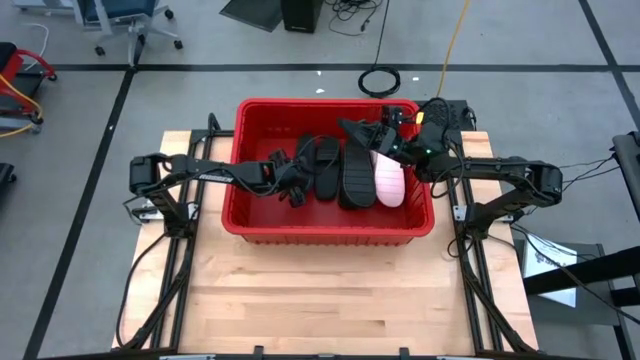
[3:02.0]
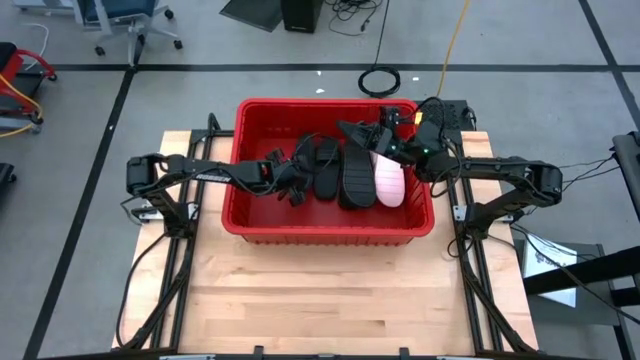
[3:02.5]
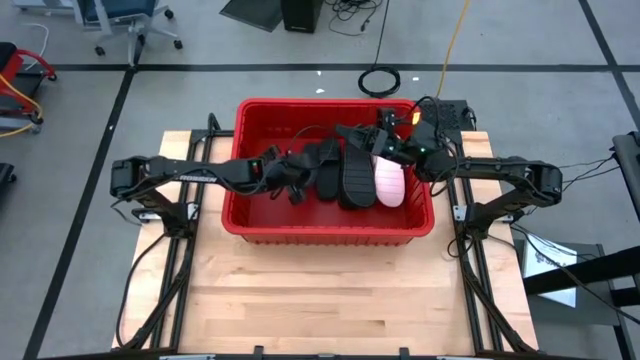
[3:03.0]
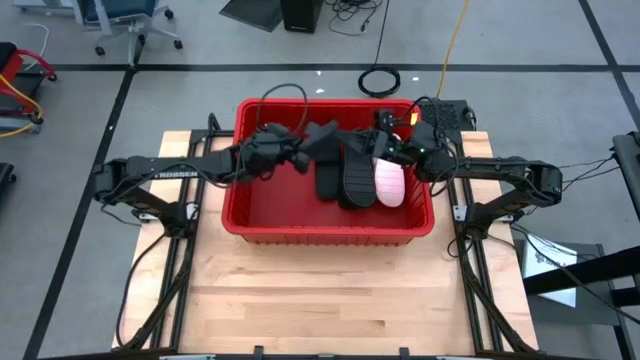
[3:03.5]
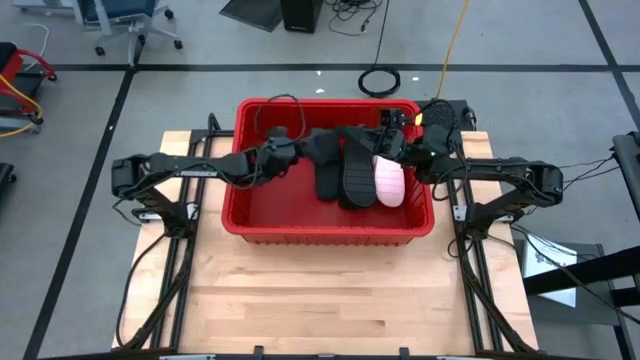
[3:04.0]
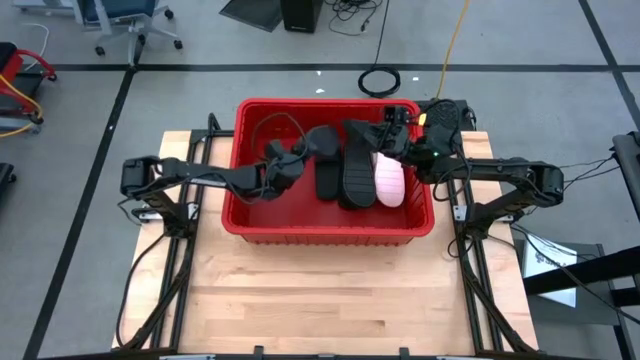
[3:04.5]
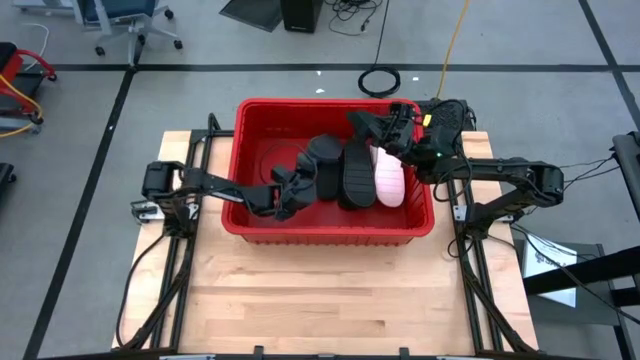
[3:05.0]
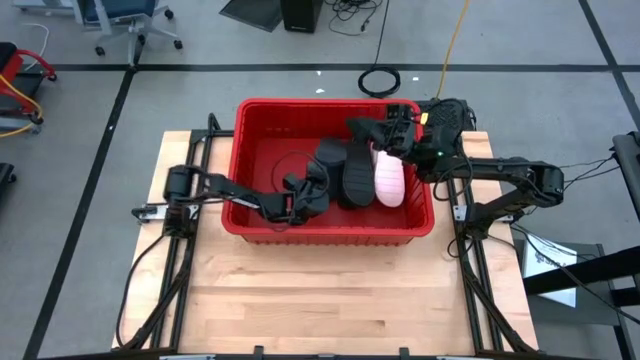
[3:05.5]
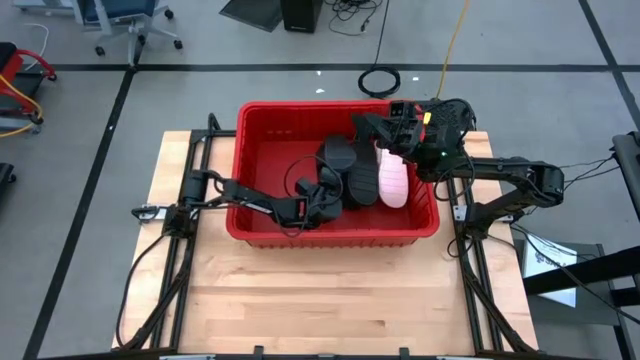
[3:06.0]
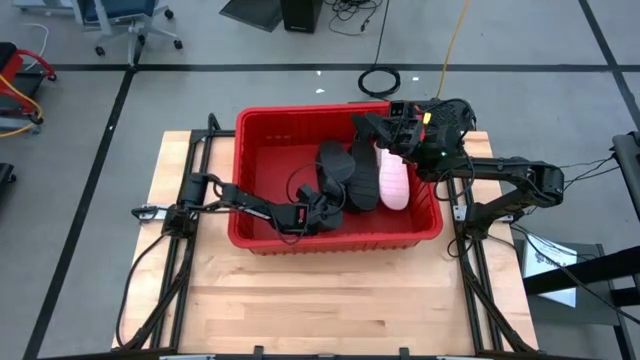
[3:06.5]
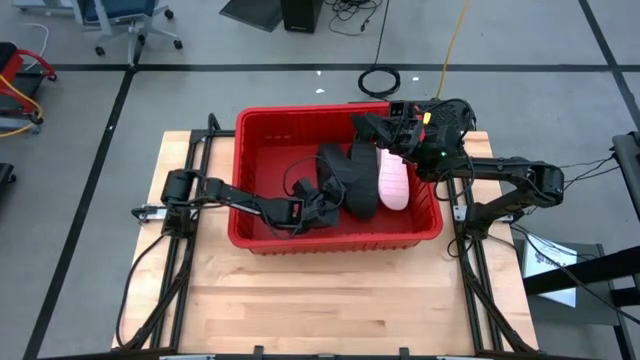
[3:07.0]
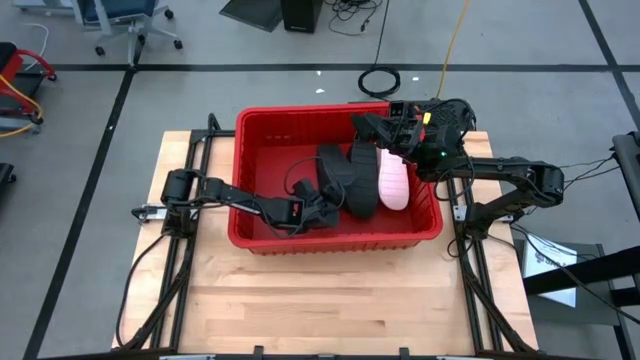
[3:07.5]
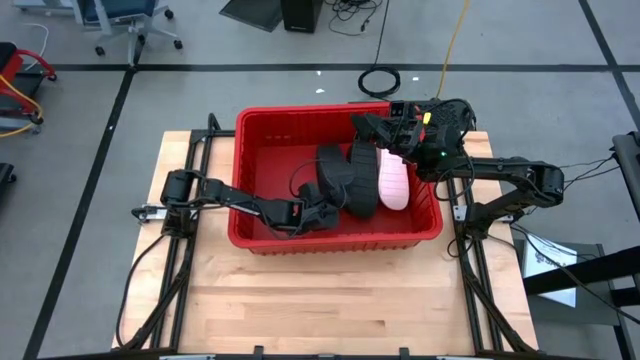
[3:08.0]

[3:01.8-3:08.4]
Task: Pick and place slides into bin
Stack the black slide on top of the black slide in the red bin

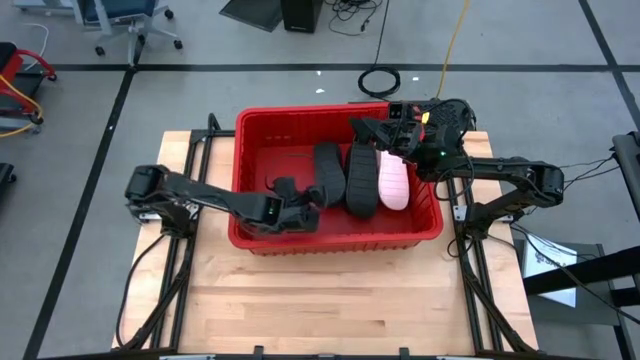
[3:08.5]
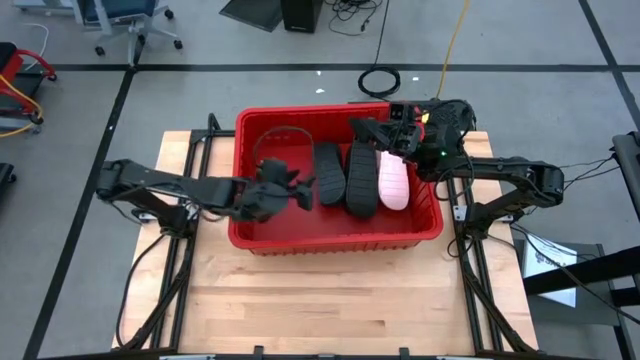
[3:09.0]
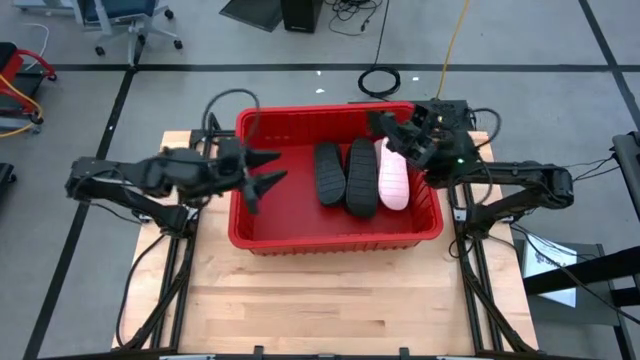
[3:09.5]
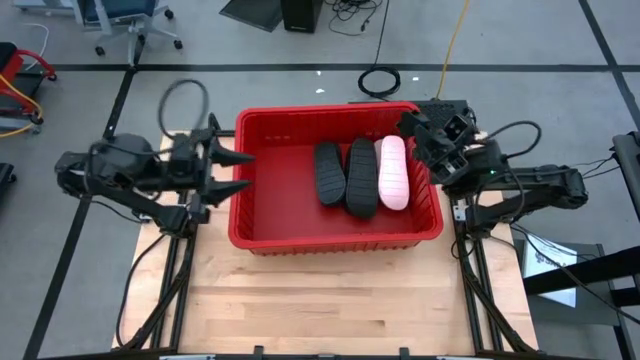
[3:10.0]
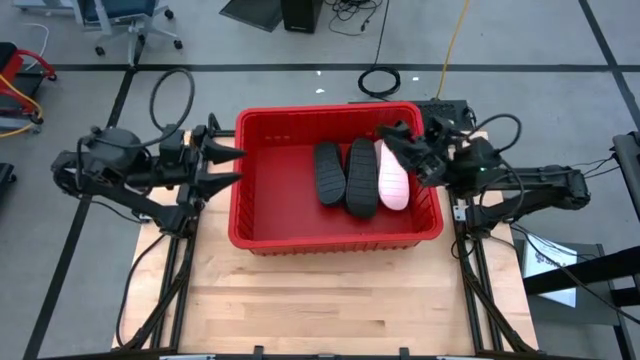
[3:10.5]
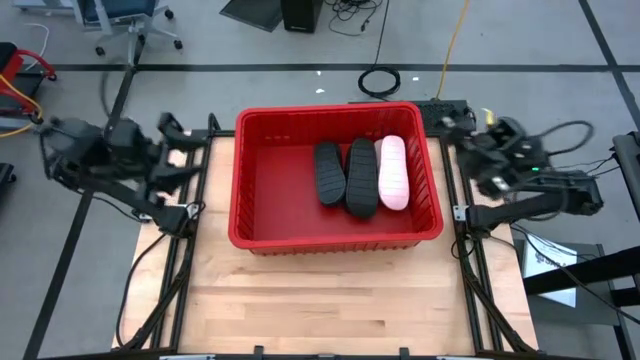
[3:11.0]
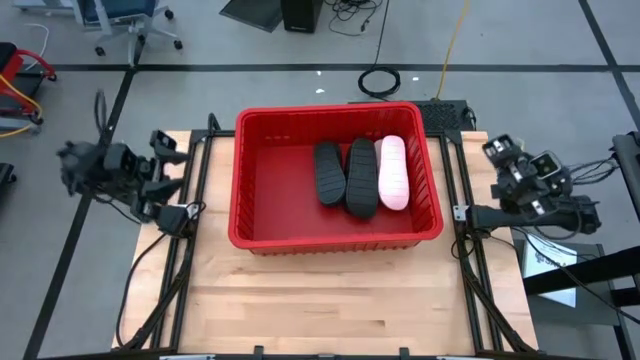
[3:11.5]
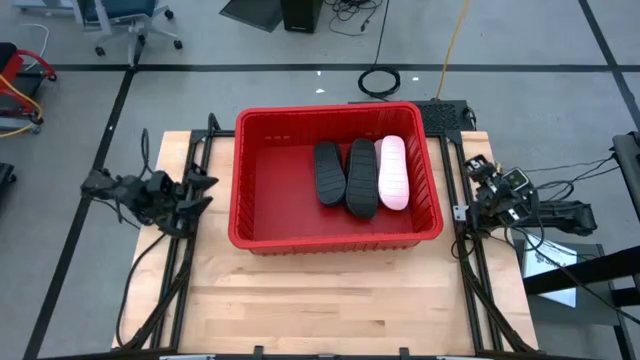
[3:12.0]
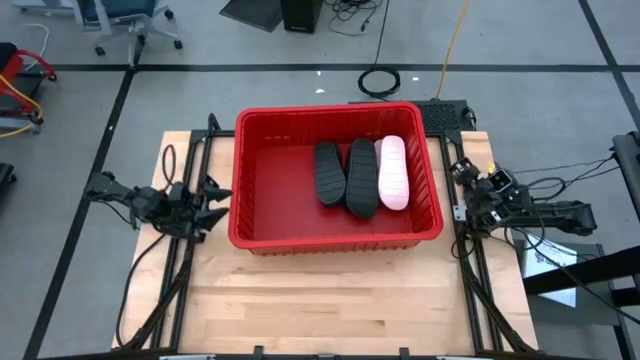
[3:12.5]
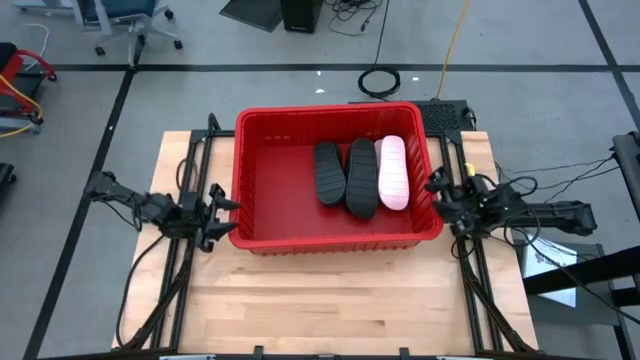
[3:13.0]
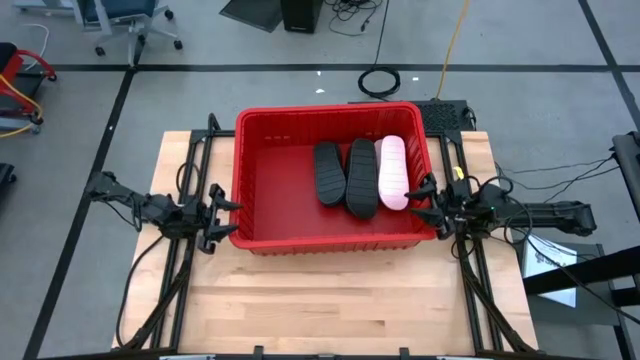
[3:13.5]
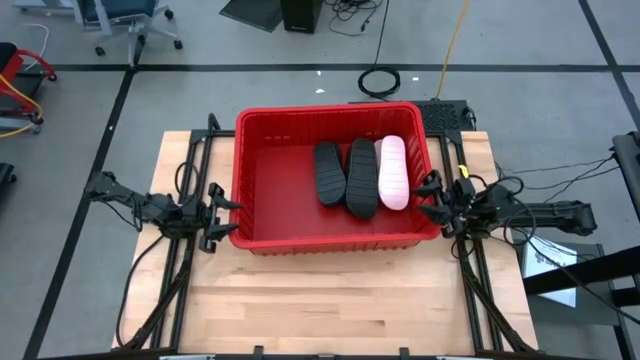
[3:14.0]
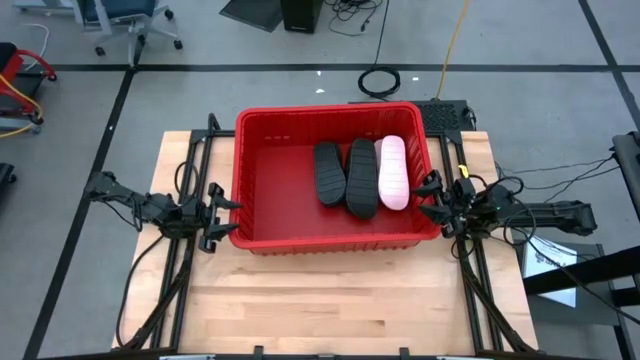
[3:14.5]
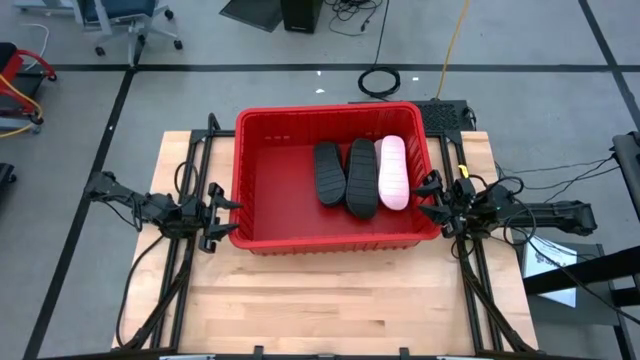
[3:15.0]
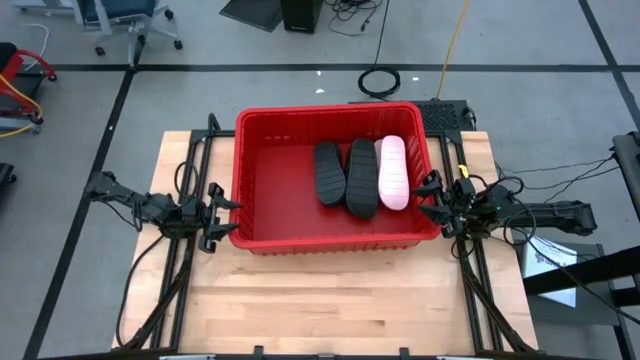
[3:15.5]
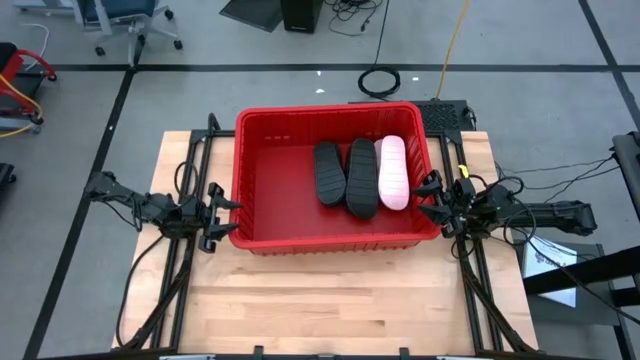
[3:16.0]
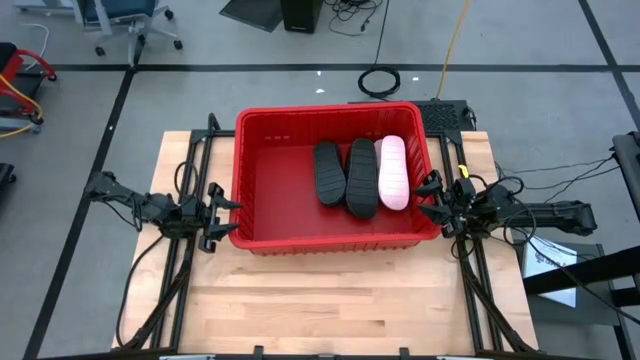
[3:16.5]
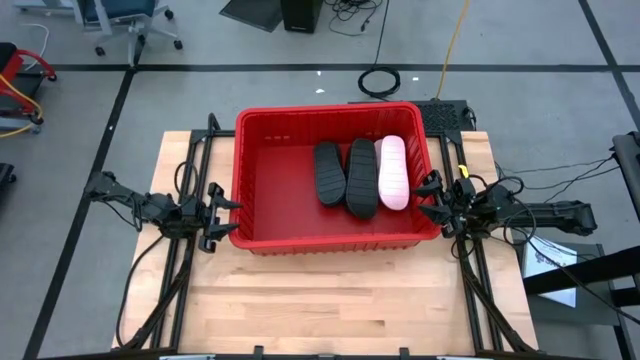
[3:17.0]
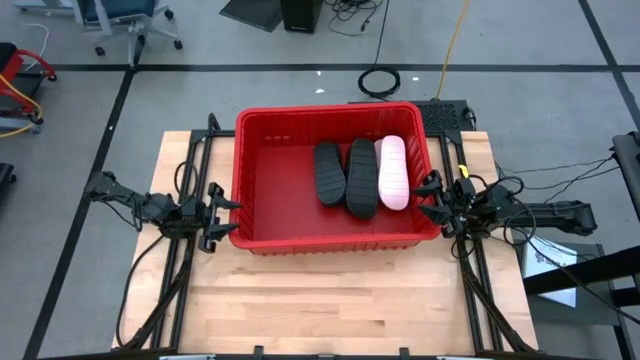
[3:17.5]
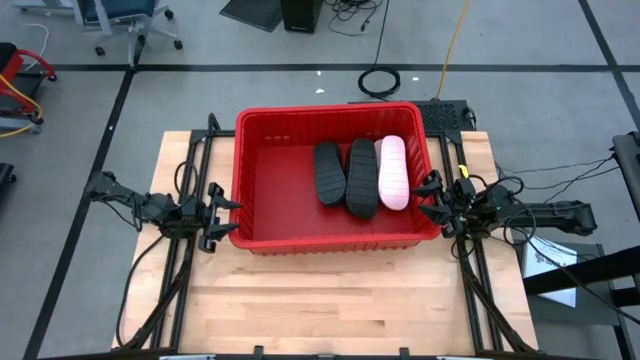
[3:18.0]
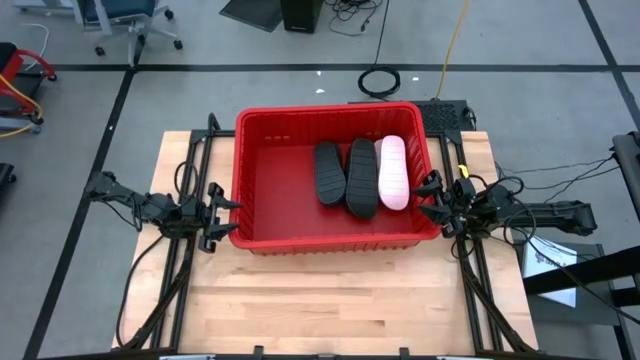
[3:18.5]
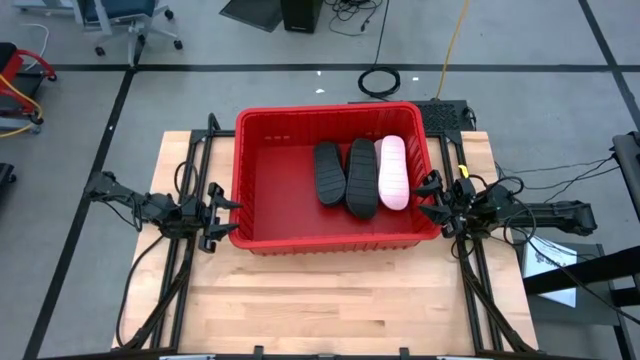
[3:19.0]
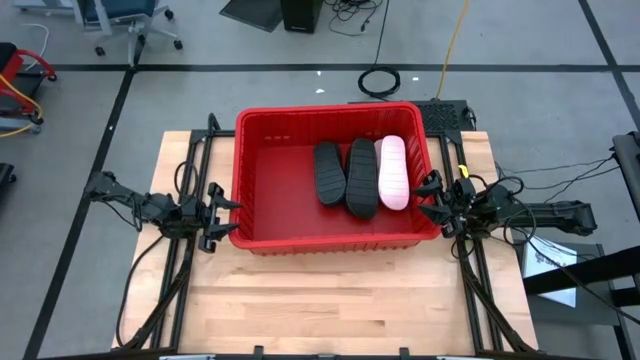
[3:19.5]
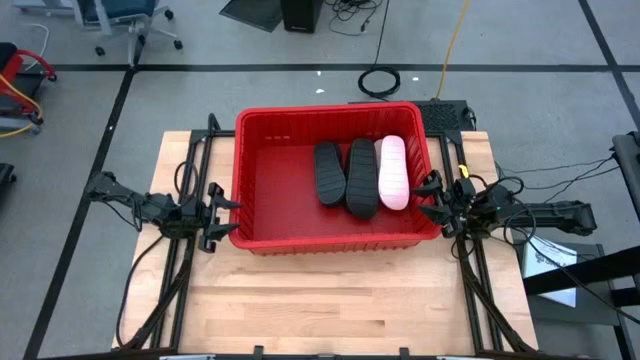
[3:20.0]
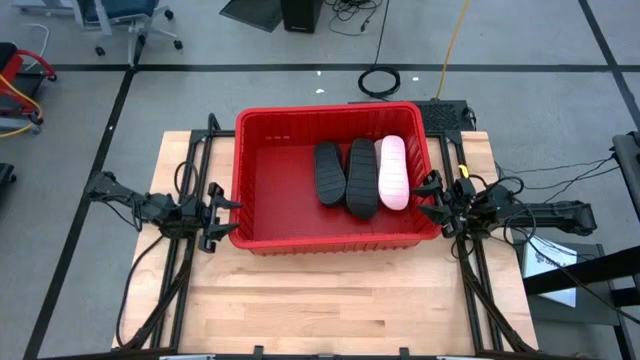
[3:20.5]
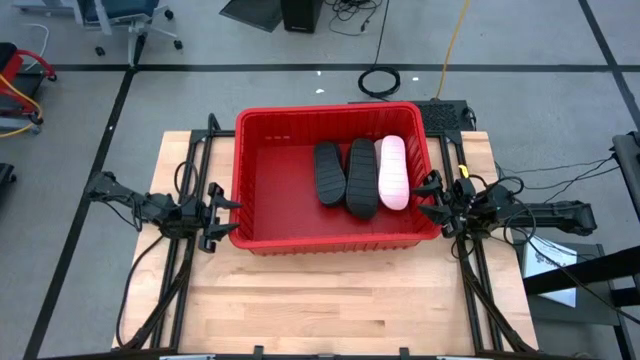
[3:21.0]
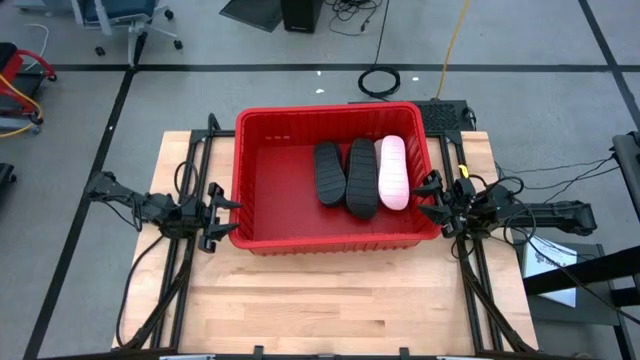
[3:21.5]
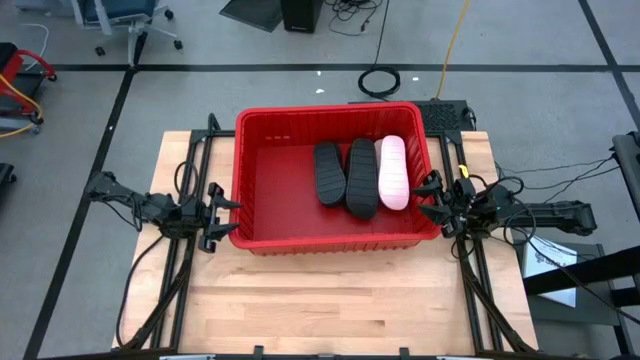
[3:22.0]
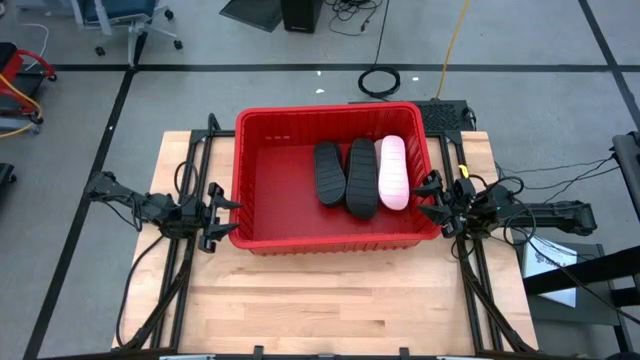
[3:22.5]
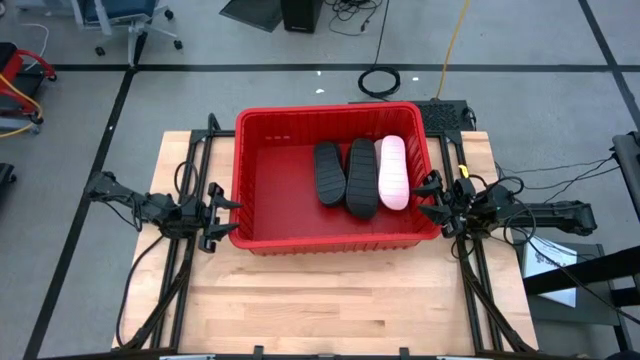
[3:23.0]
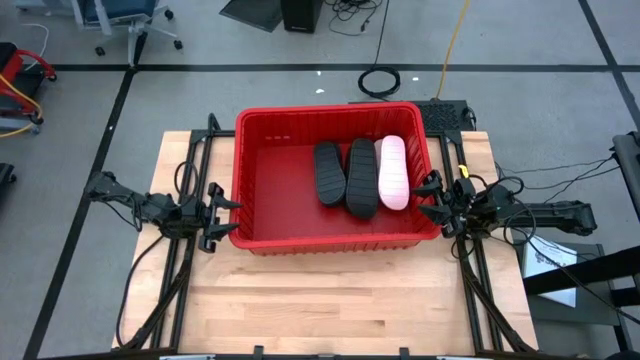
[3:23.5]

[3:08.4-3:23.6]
Return to Home Position
